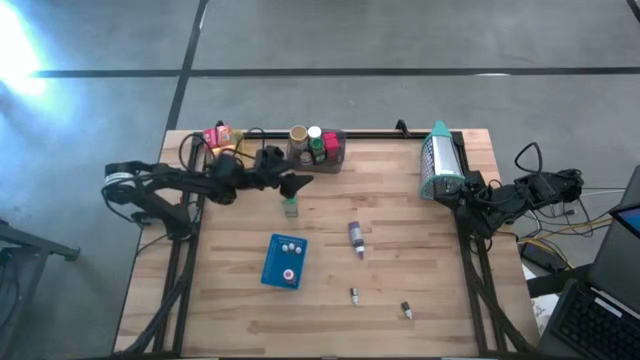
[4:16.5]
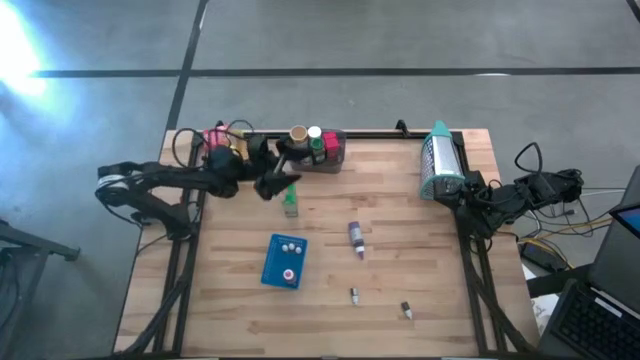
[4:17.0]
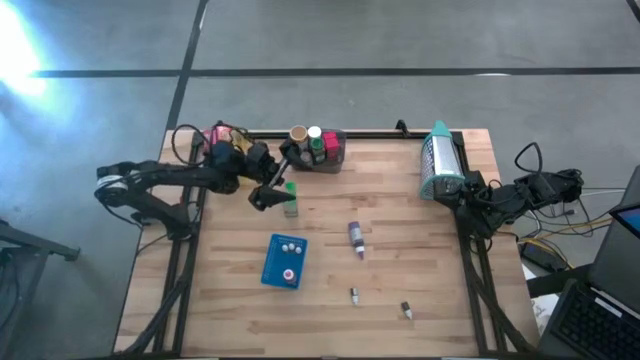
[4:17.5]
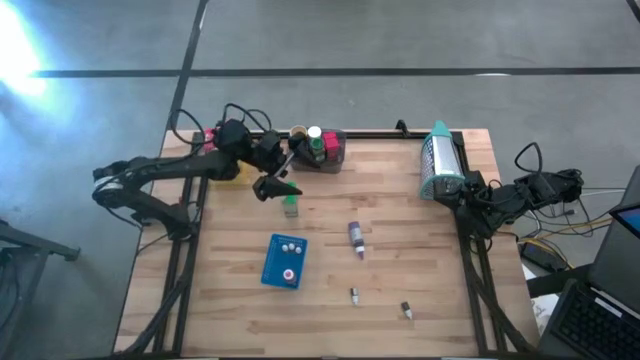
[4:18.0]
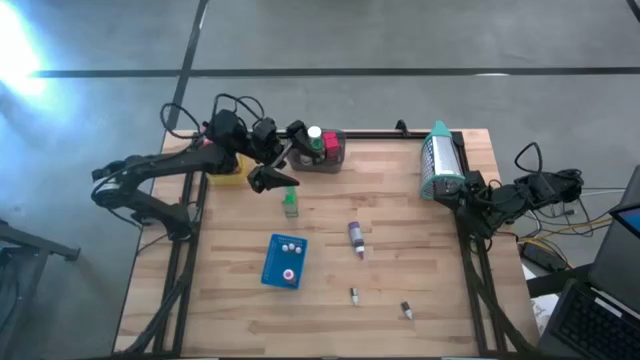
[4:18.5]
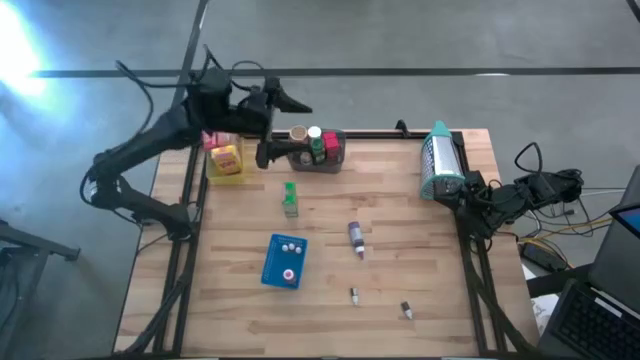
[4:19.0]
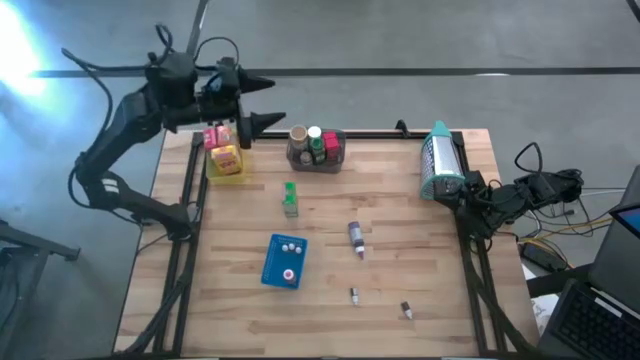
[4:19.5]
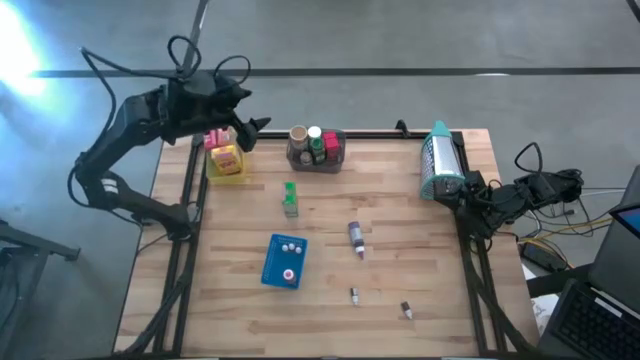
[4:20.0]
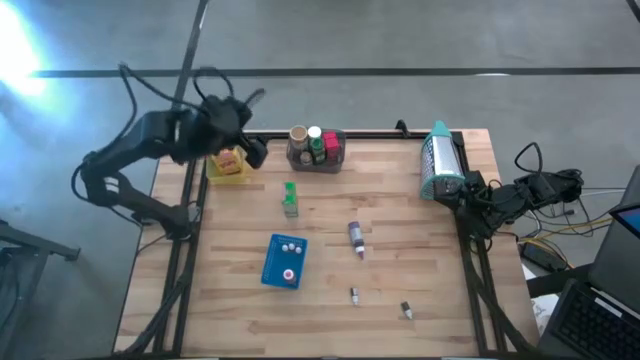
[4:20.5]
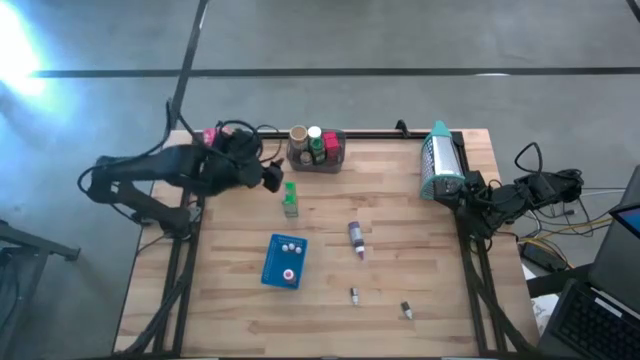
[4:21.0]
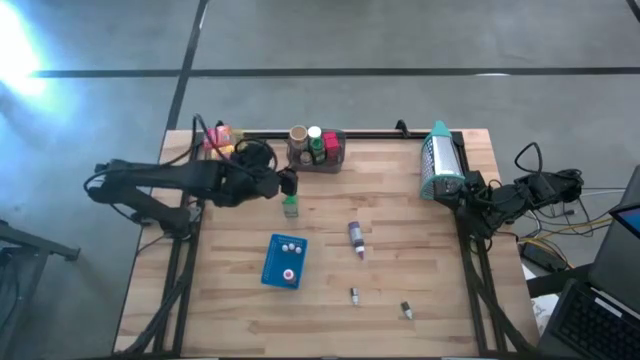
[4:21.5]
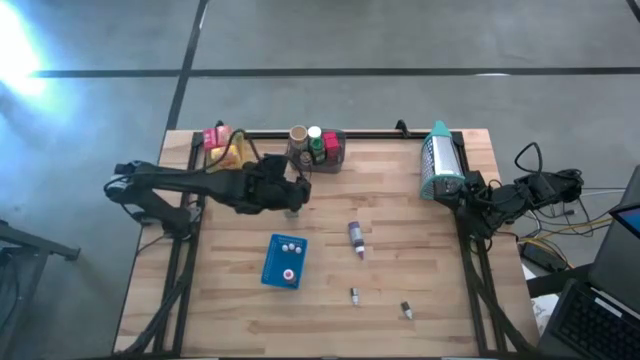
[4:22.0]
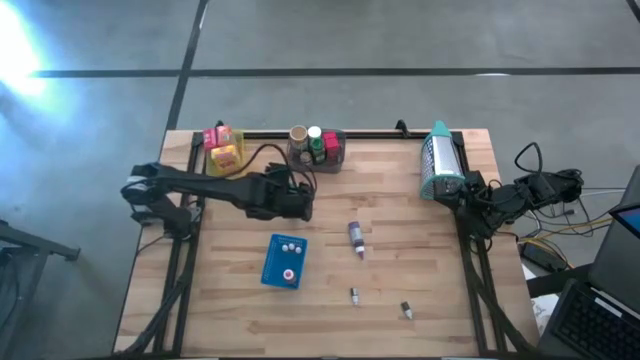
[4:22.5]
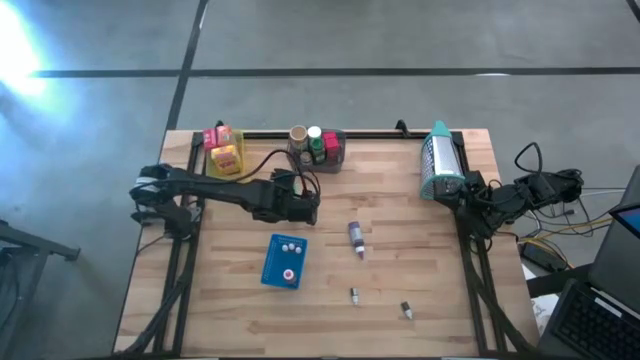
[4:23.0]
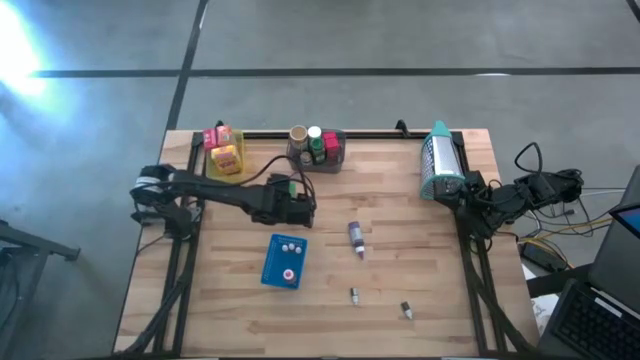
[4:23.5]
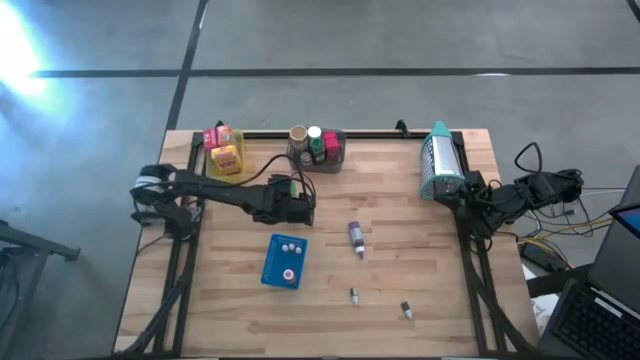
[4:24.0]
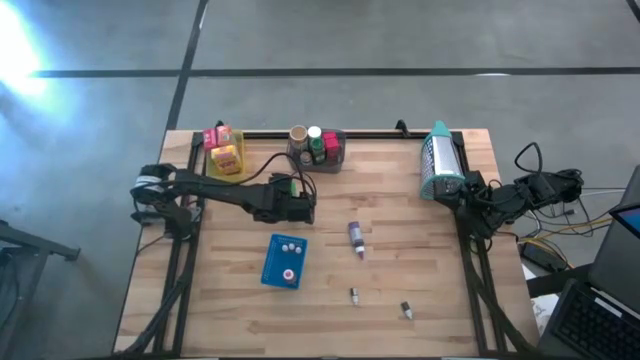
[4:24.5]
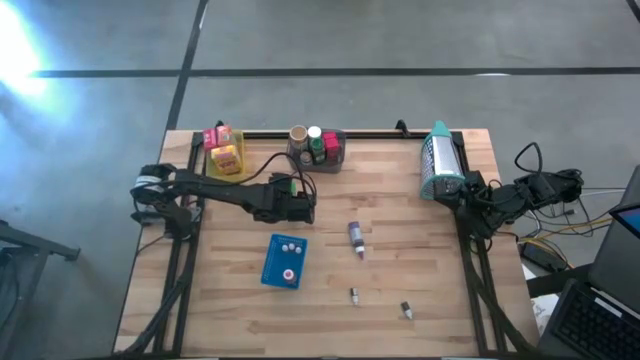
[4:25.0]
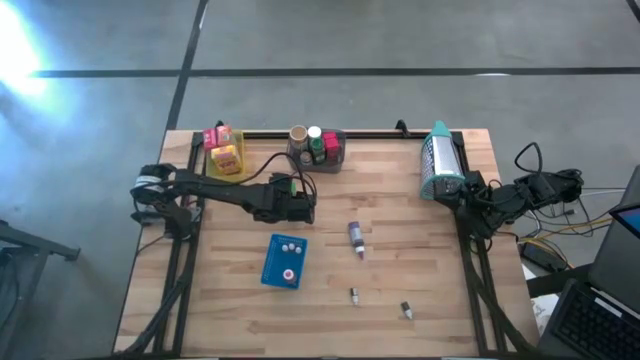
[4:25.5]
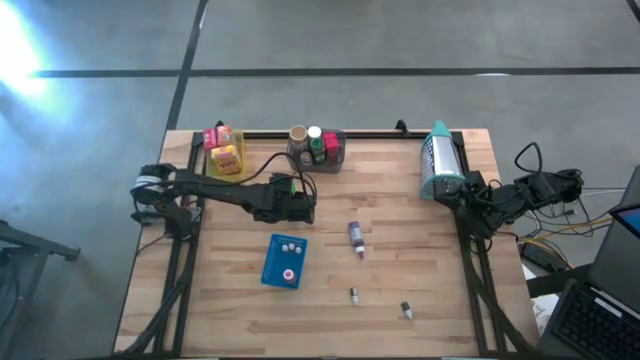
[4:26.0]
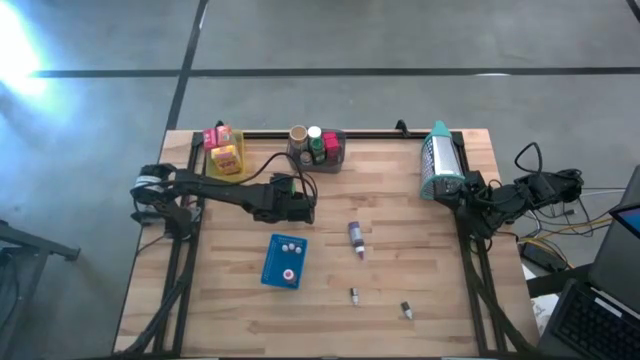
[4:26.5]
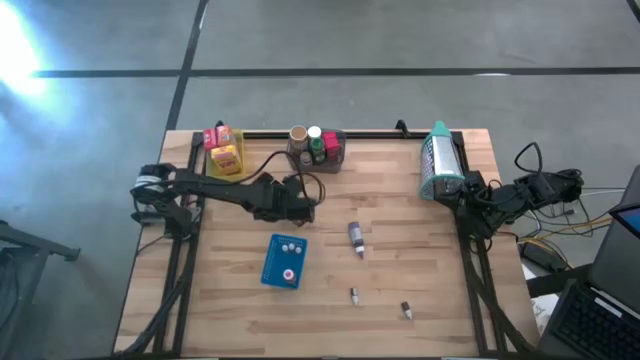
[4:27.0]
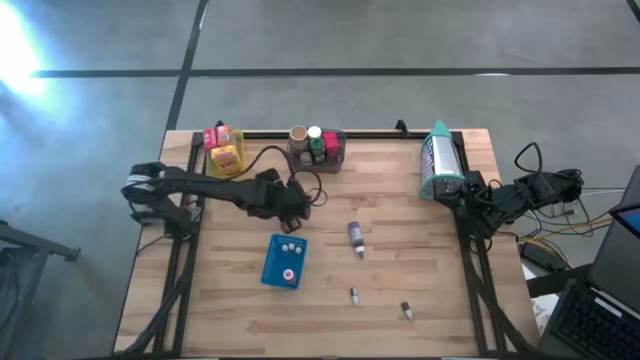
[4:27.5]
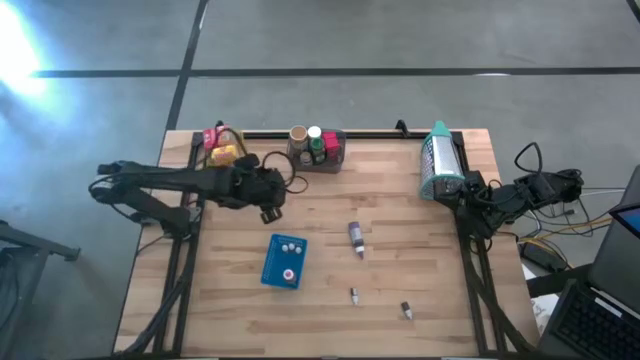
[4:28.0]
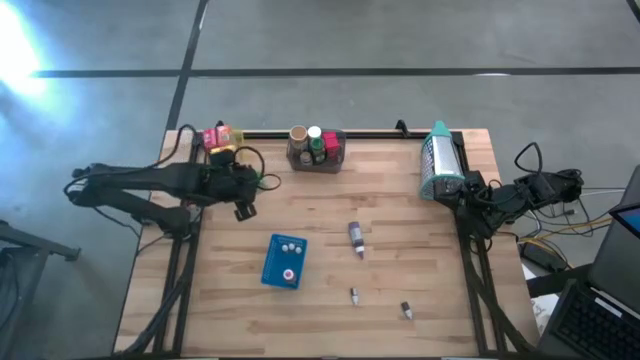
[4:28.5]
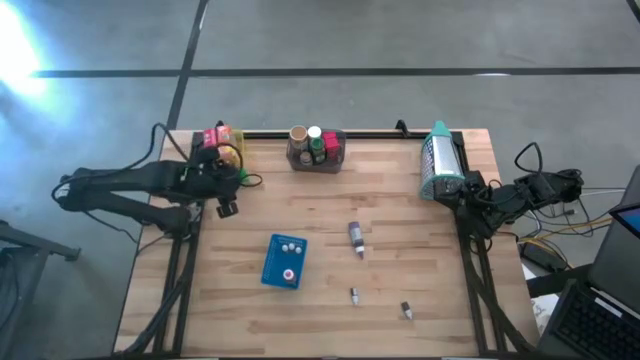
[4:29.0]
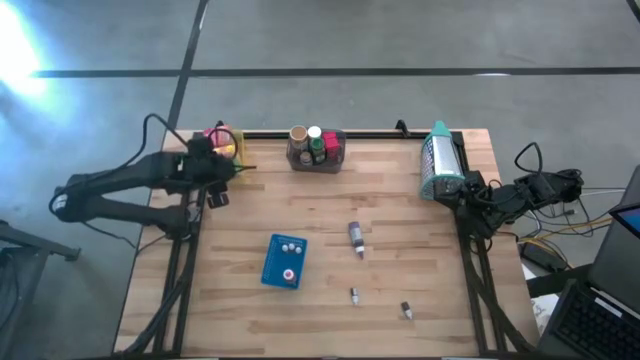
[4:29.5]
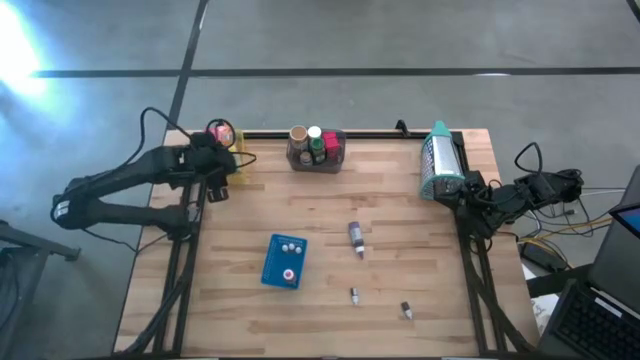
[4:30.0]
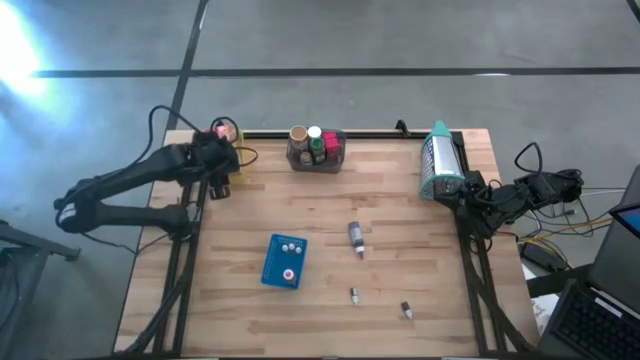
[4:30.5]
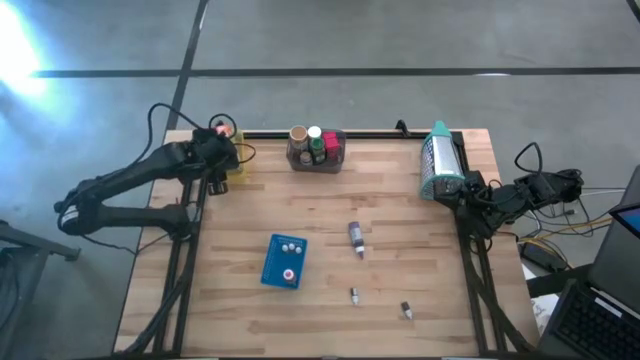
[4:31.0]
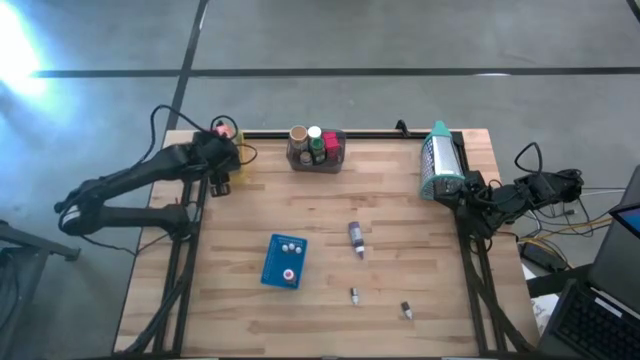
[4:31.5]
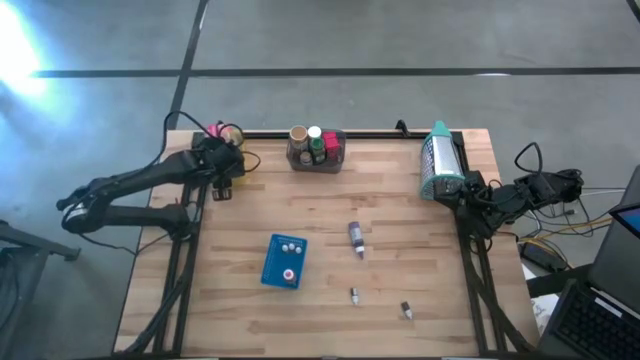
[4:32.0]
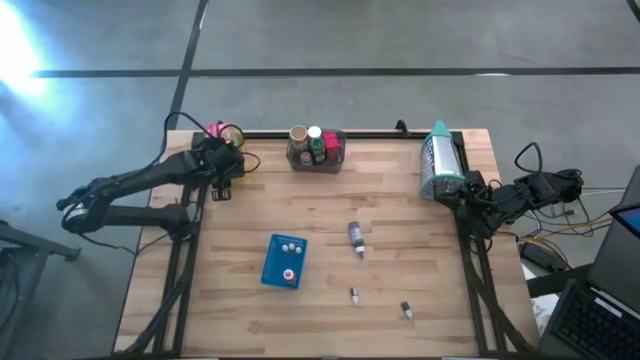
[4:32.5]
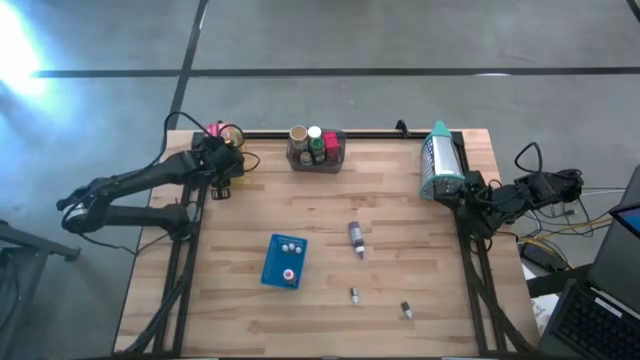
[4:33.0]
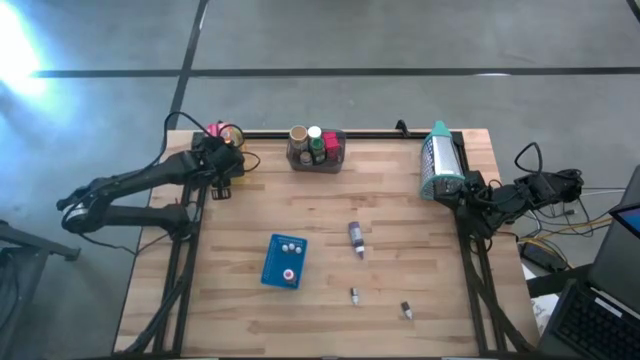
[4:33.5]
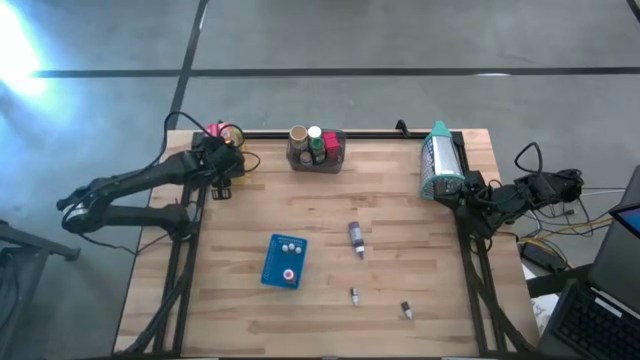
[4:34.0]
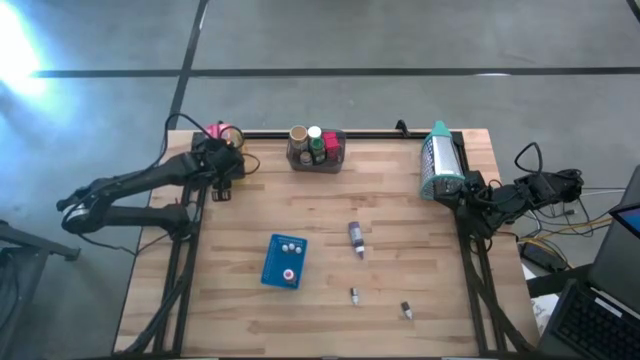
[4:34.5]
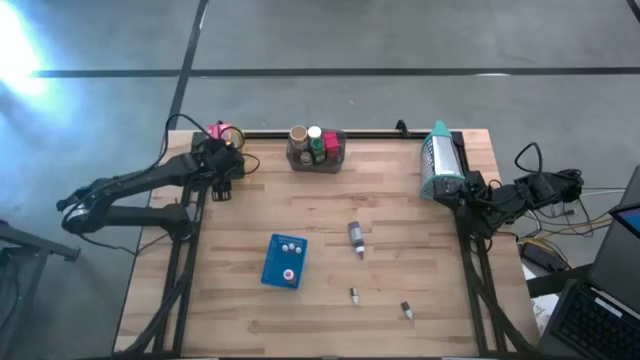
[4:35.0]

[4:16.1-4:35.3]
Task: Pick & Place Kitchen Items
Put the green cereal box into the yellow bin

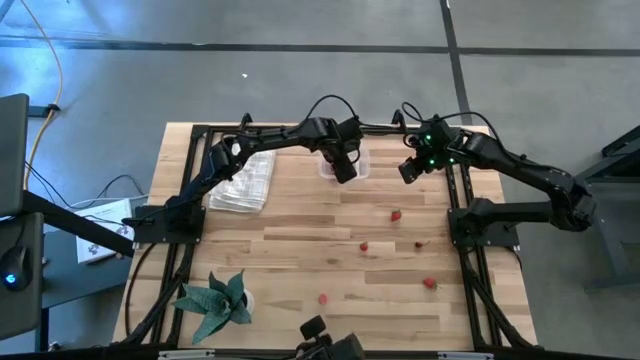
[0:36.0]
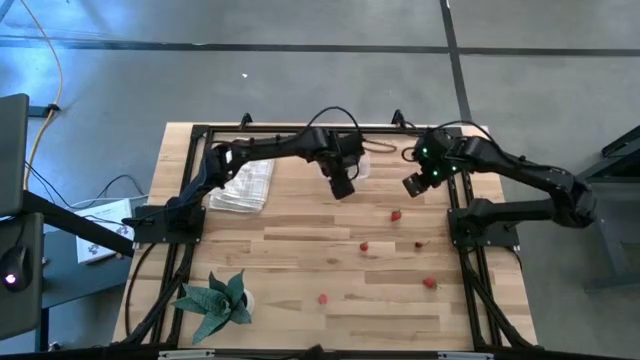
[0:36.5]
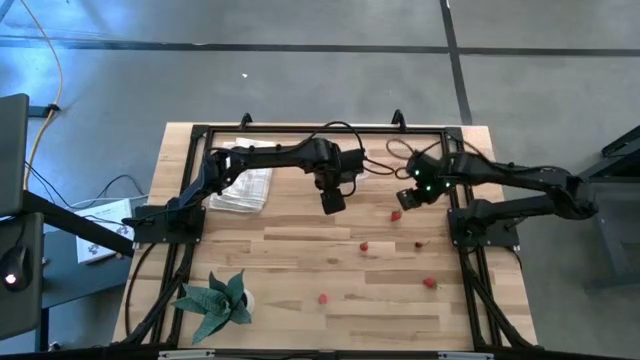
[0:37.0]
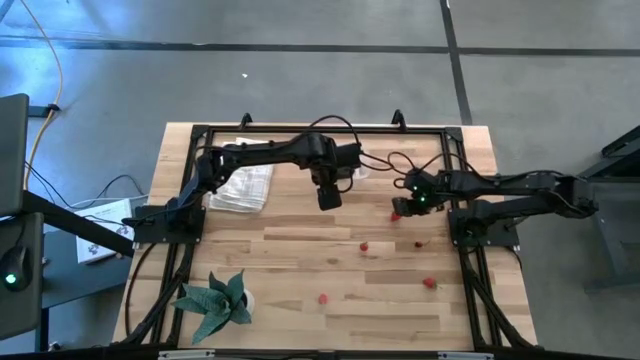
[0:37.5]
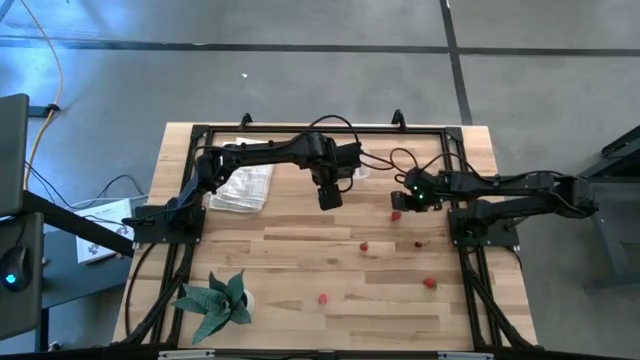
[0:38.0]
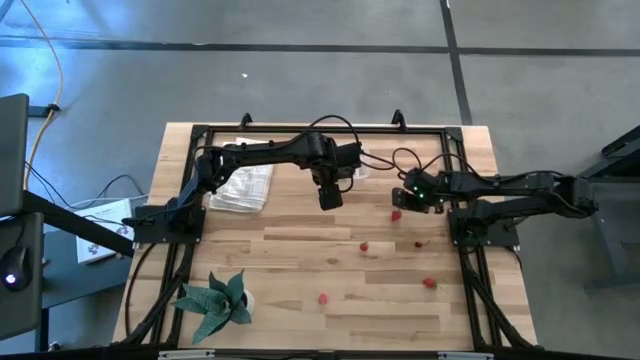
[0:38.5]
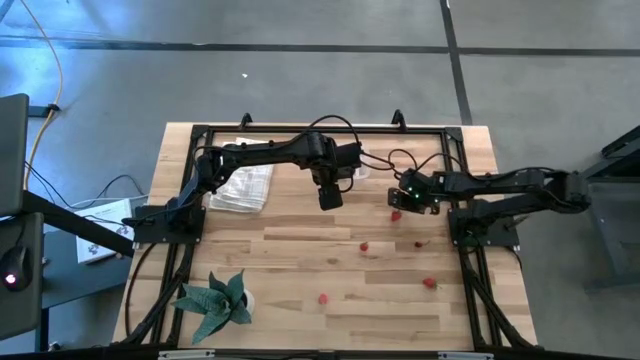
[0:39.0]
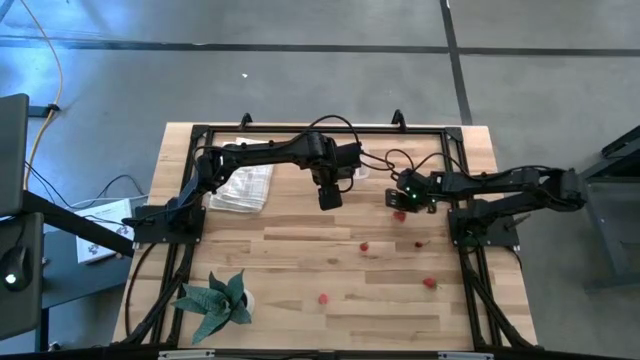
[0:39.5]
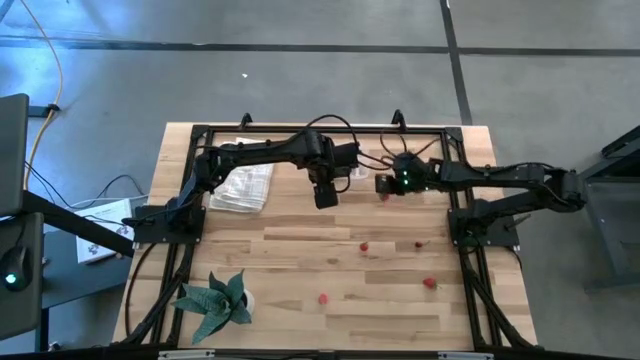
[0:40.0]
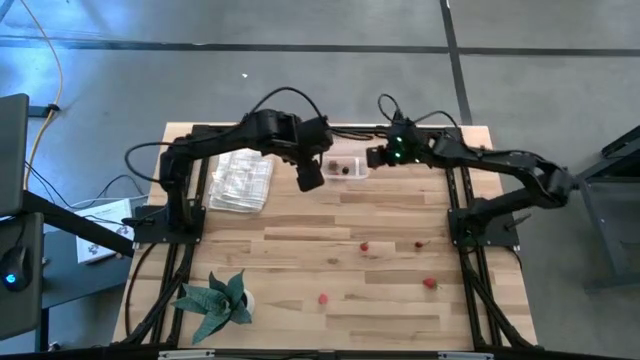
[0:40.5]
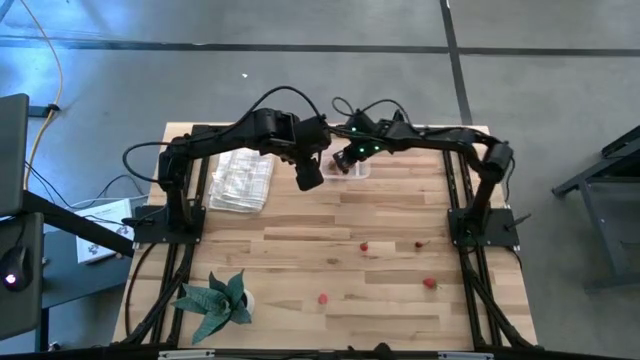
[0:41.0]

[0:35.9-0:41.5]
Task: Pick and placing Produce into tupperware
Put the top red strawberry into the transparent container
